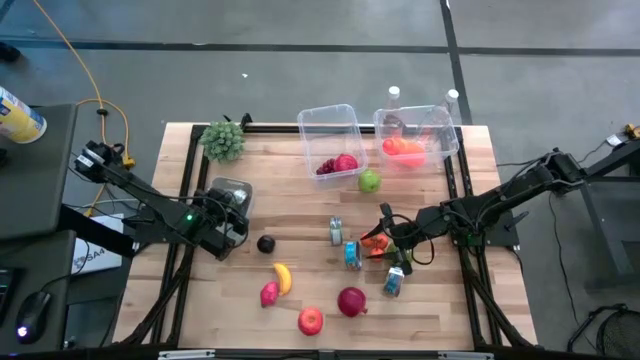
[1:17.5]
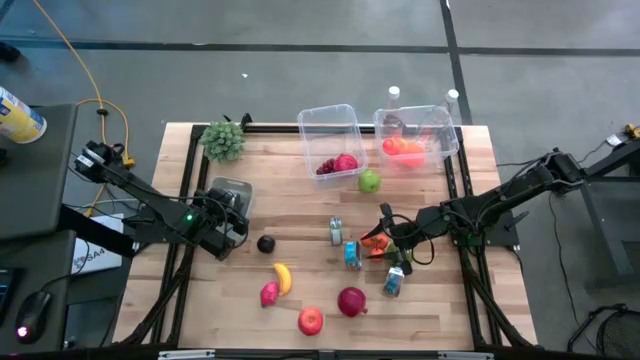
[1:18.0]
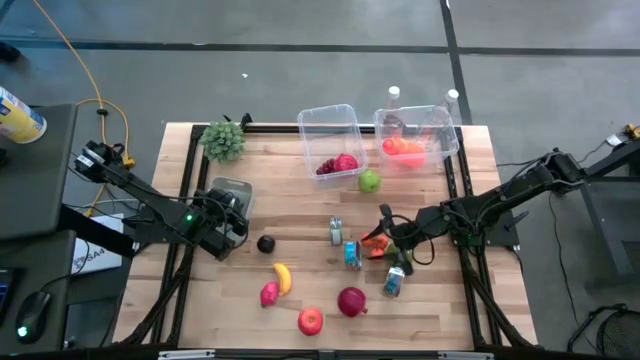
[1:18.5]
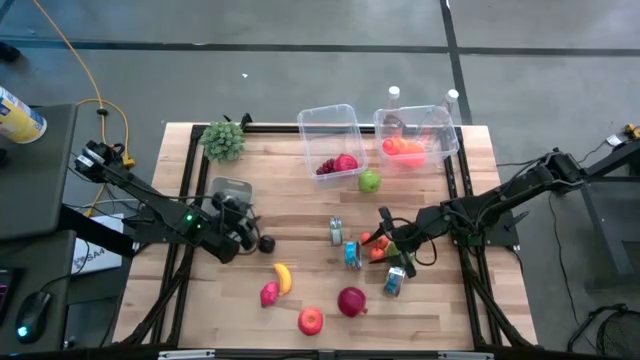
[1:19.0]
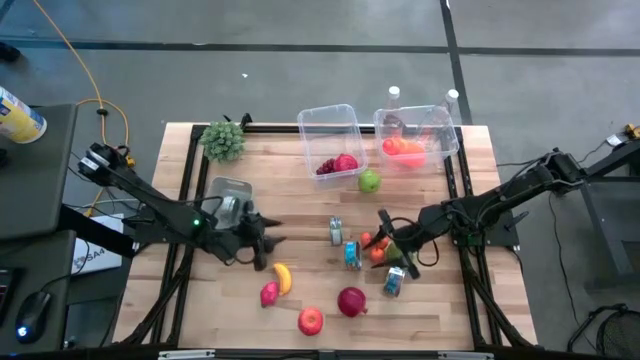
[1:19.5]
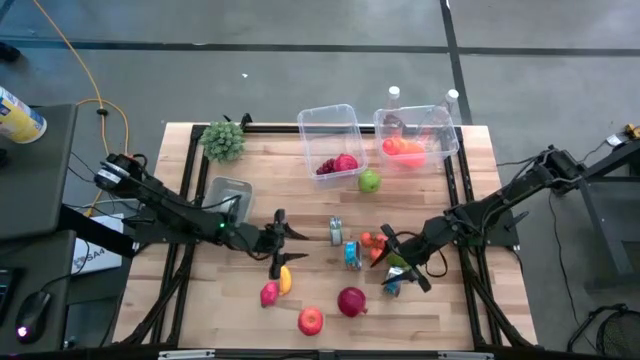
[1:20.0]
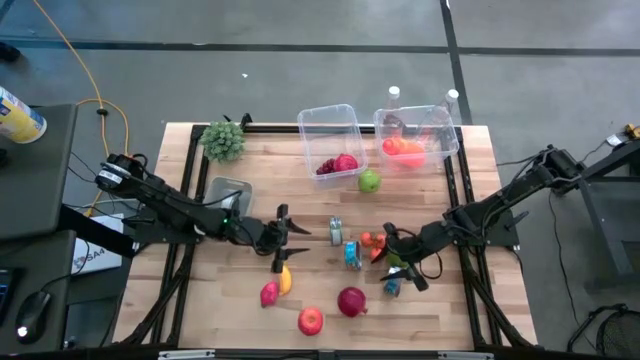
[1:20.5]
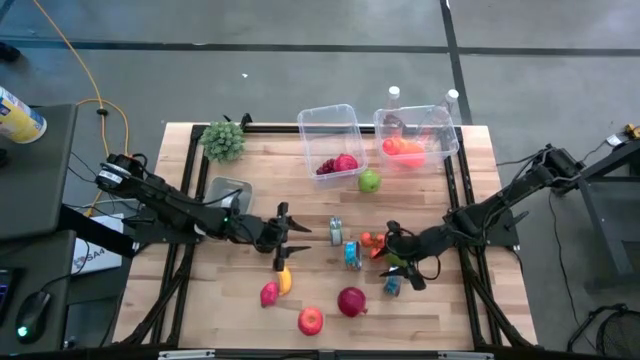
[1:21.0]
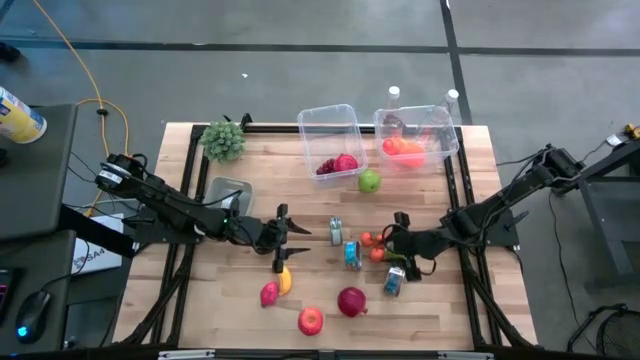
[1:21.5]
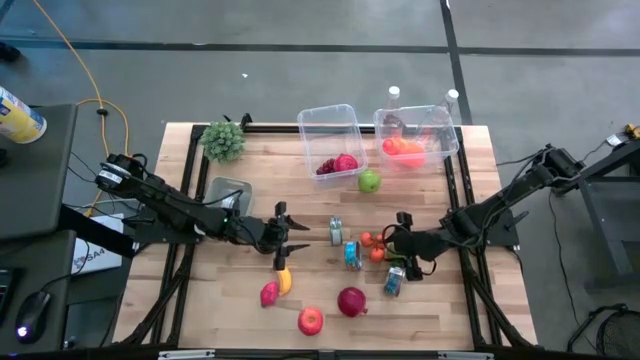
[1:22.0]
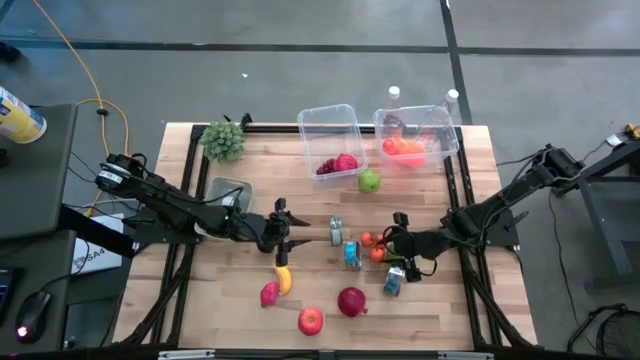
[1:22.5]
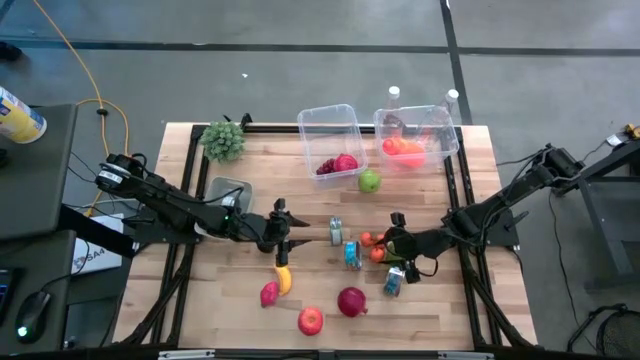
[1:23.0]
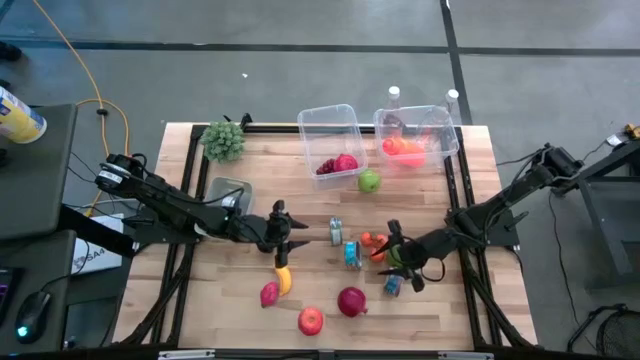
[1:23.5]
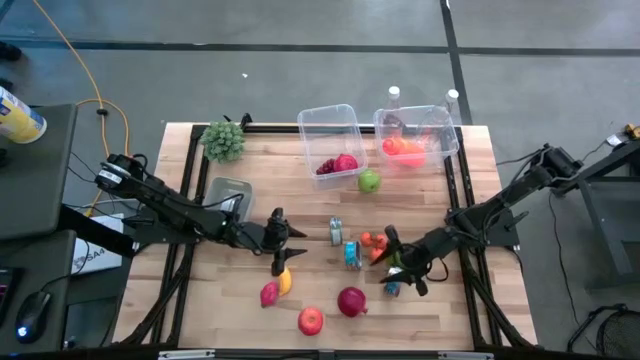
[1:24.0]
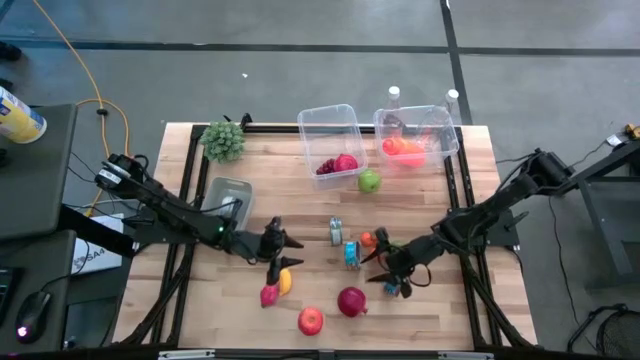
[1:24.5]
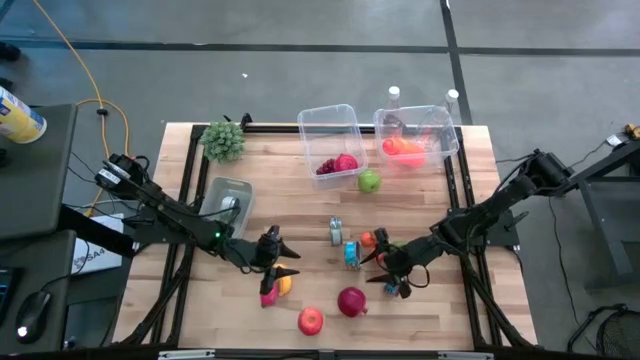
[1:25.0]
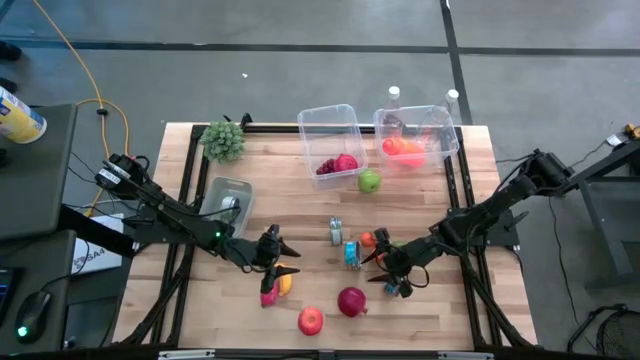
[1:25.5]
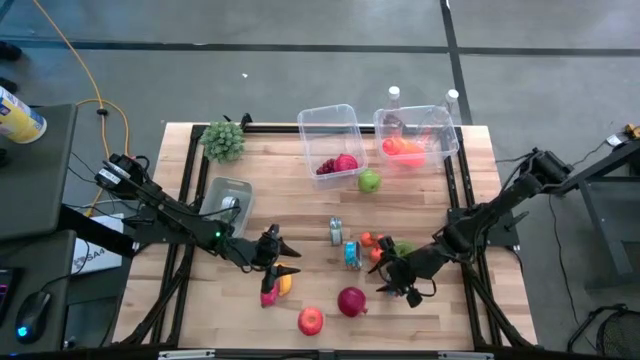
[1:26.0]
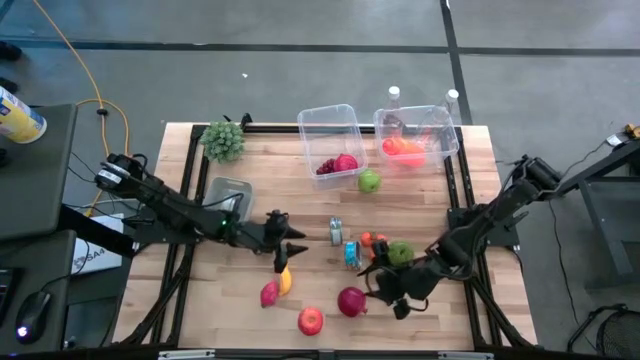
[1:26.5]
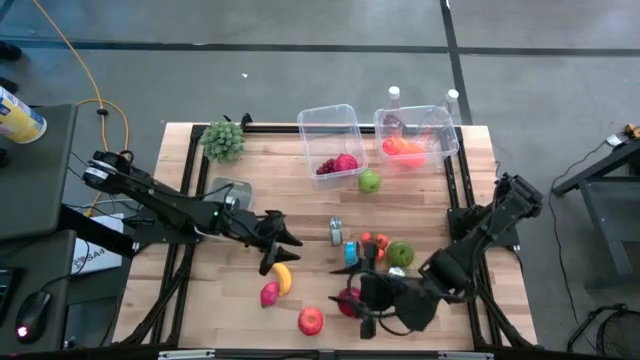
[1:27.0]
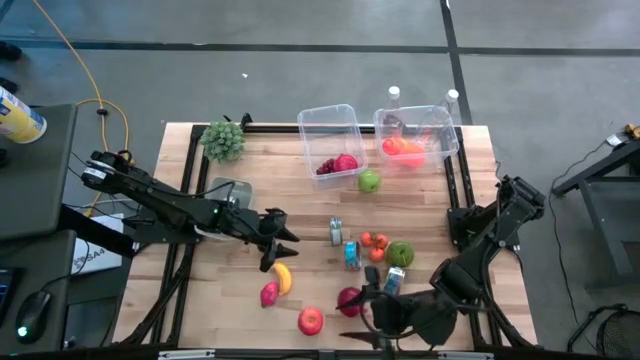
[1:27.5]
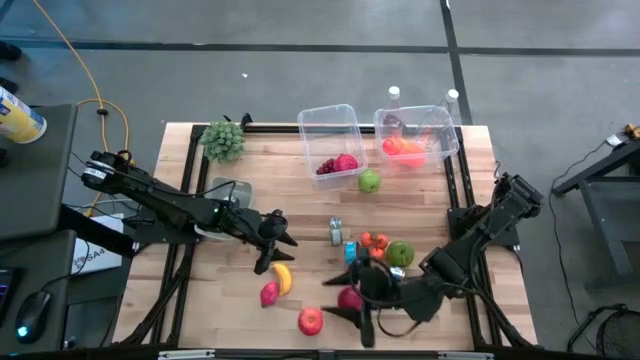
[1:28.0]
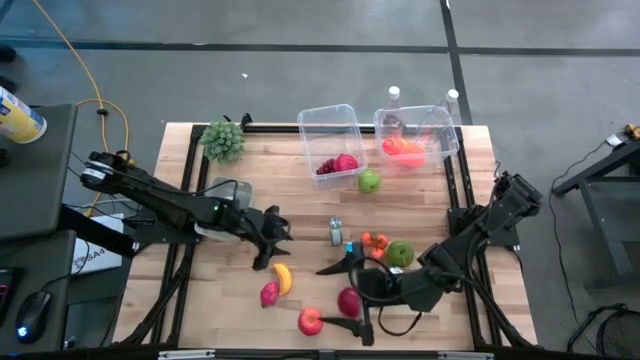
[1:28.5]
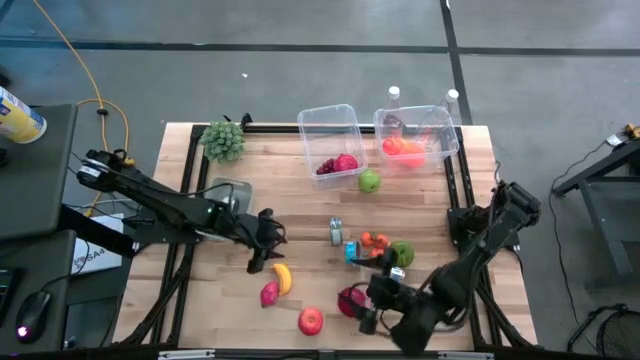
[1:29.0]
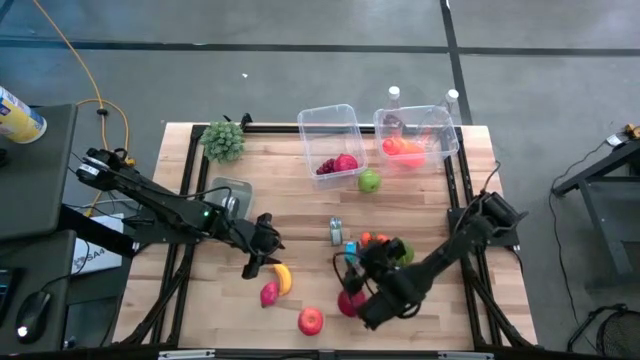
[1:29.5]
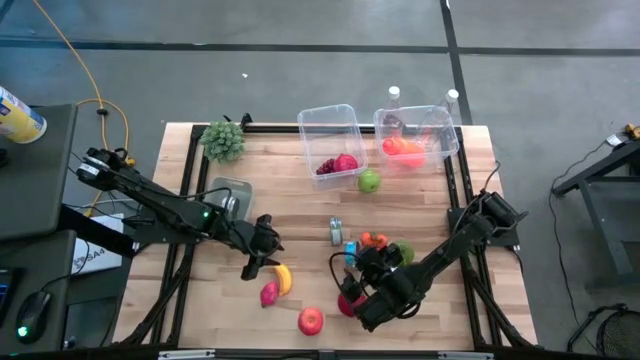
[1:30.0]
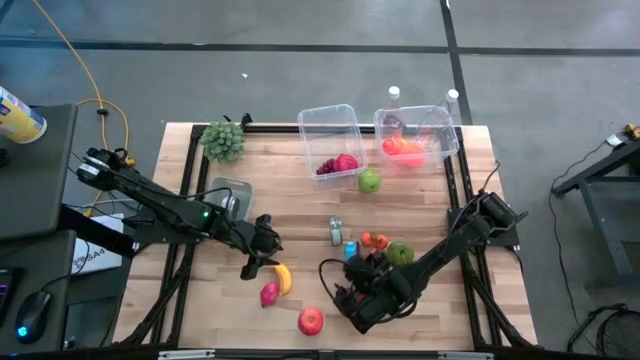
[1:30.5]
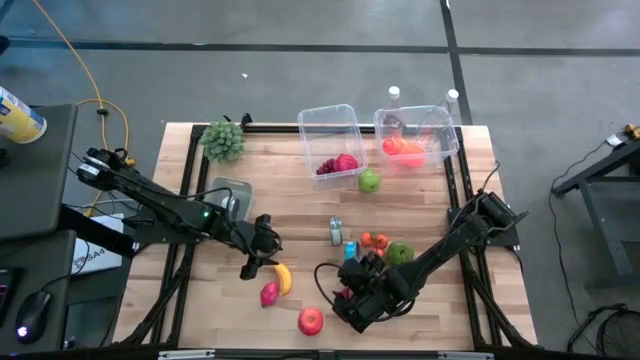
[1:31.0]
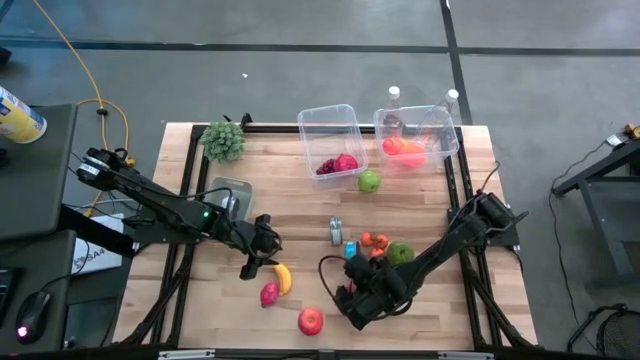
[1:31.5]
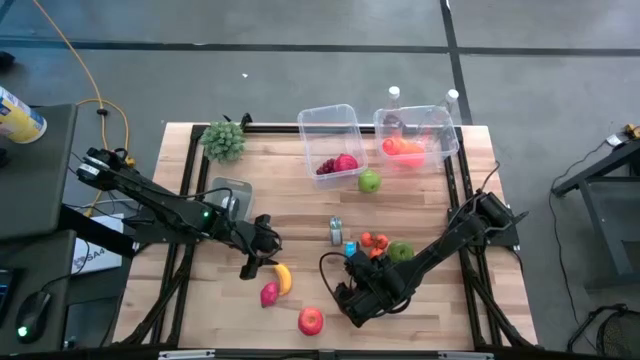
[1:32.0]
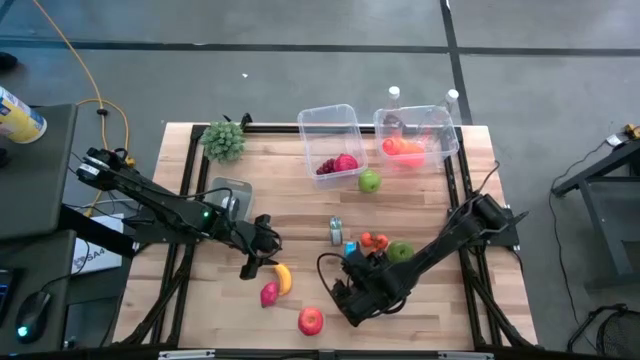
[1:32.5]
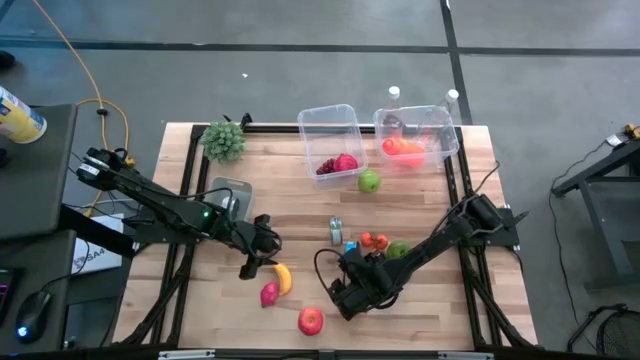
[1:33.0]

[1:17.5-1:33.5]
Task: Pick & Place Food Item
Put the yellow tuna can into the gray bin

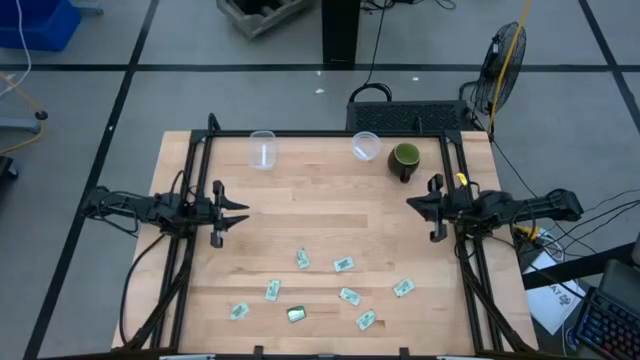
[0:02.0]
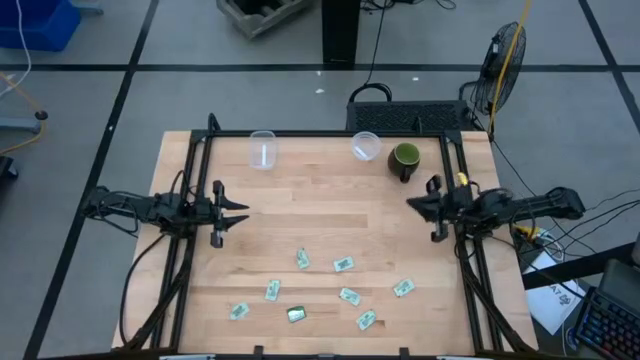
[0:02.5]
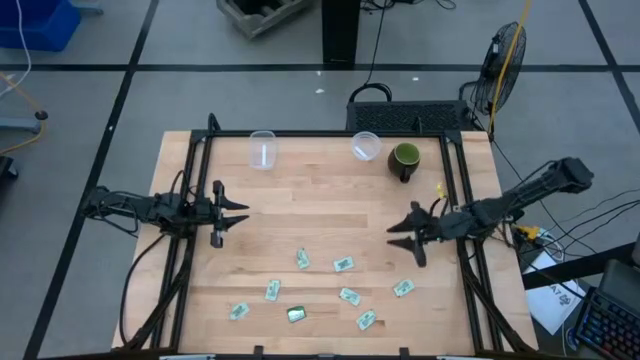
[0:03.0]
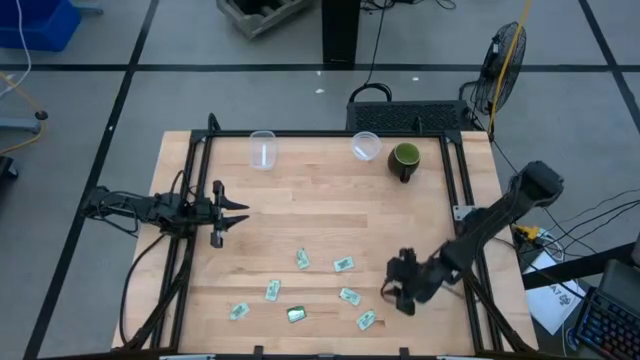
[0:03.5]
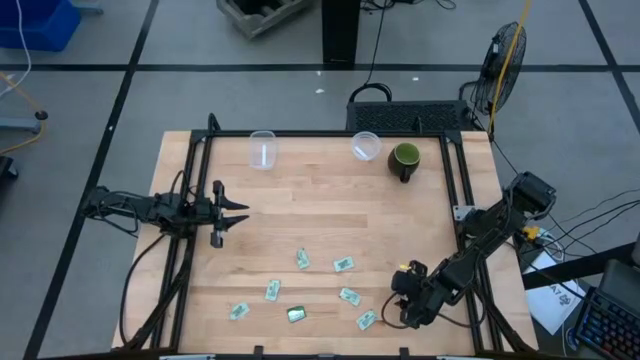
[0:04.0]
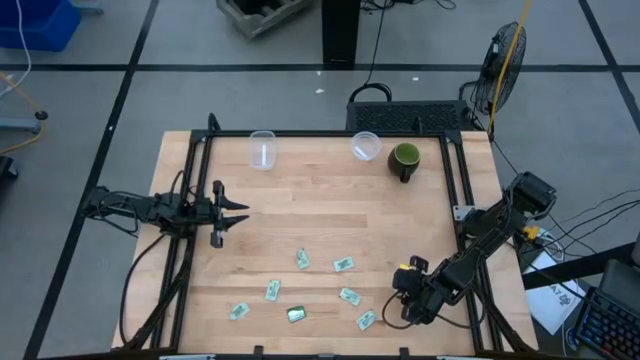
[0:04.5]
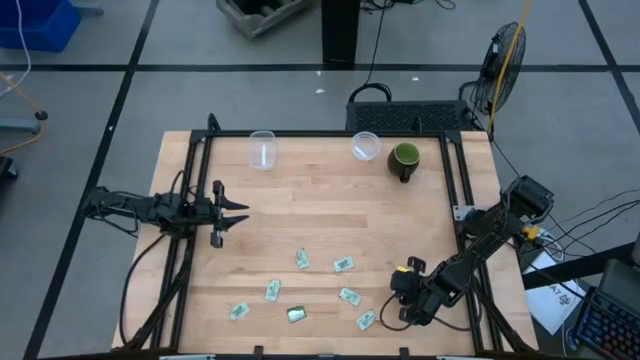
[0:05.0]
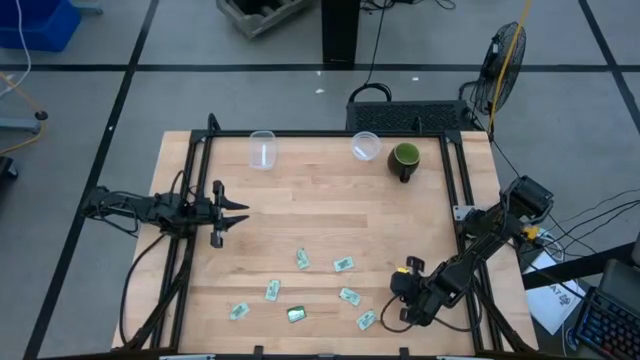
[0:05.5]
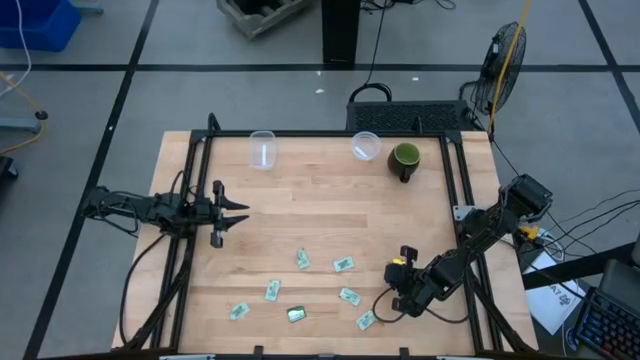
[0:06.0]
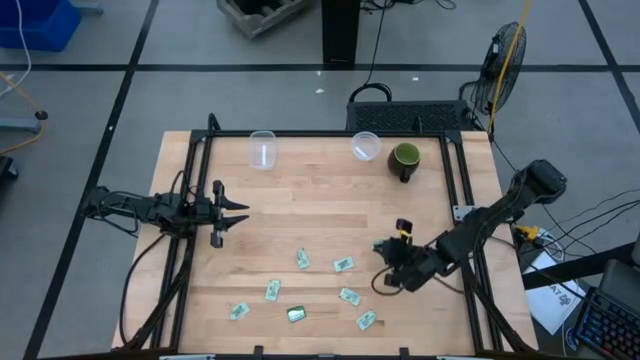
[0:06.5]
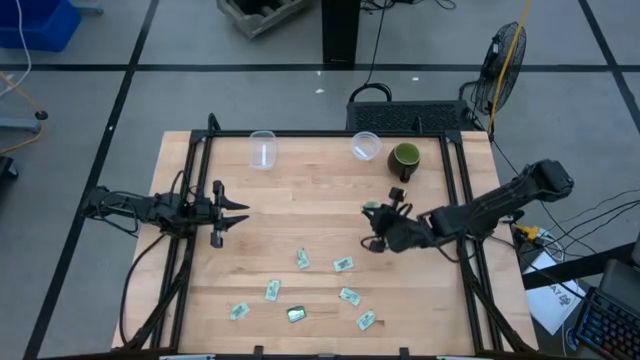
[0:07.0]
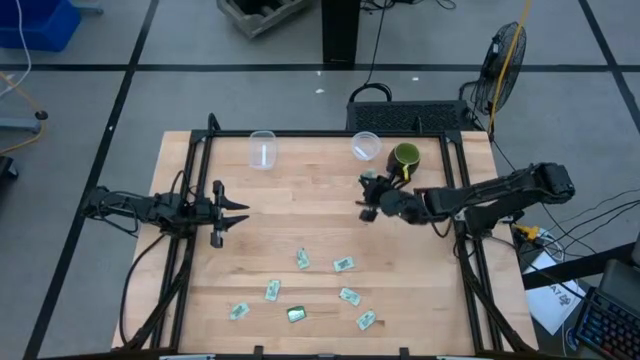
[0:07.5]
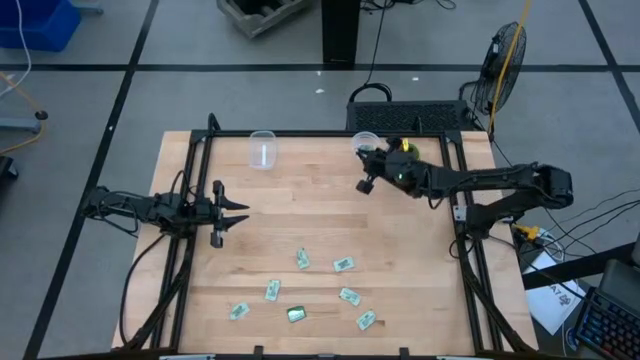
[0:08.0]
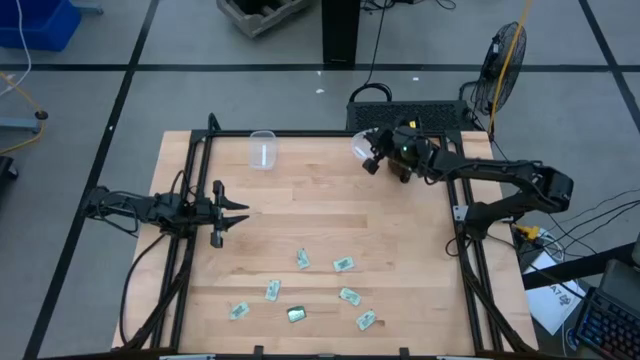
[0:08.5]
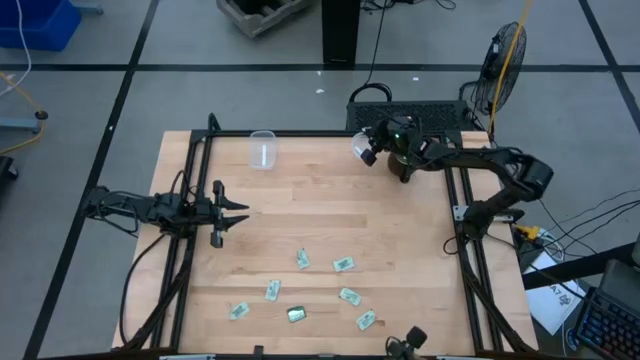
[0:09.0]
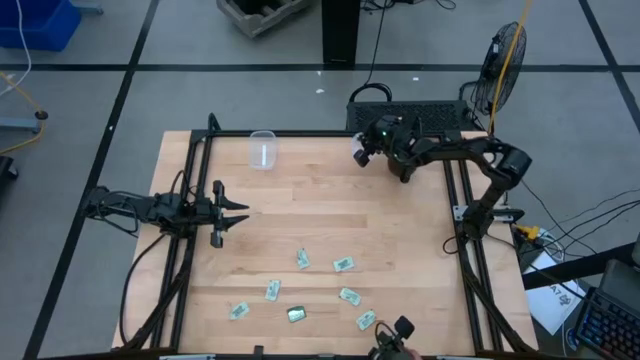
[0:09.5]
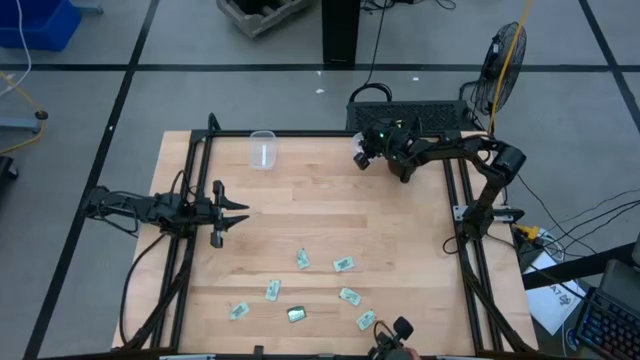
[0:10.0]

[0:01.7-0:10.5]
Task: Pick and place items into bin
Put the green stevia packet into the right transparent bin
